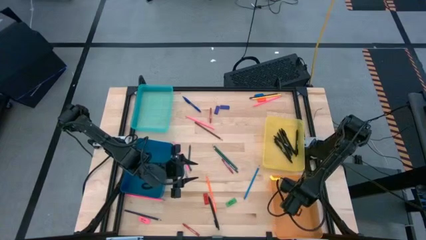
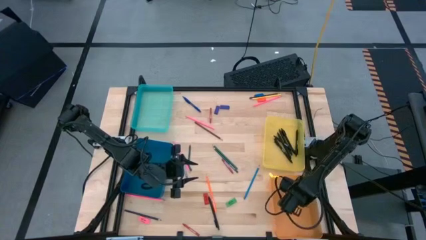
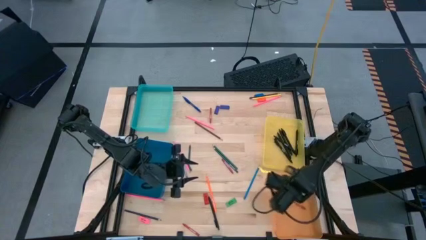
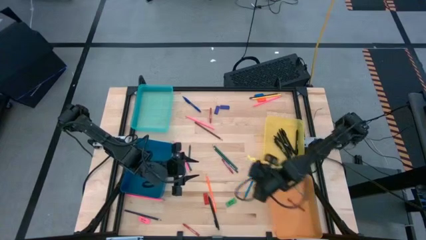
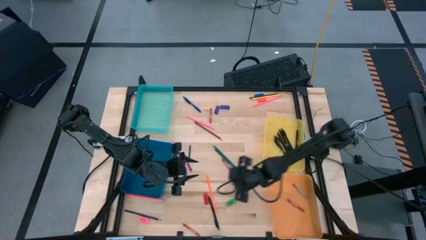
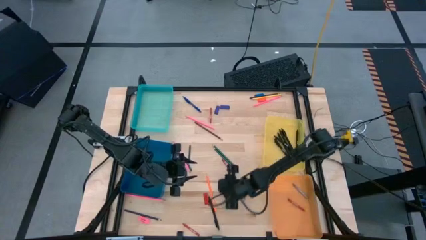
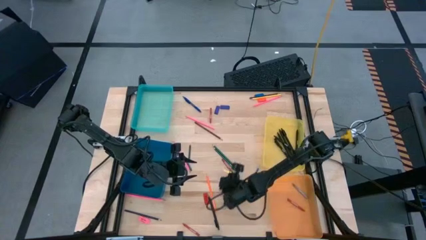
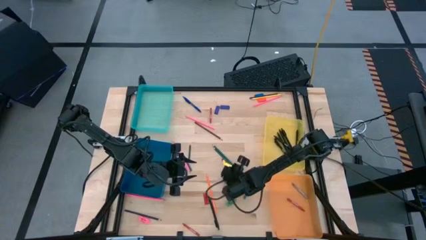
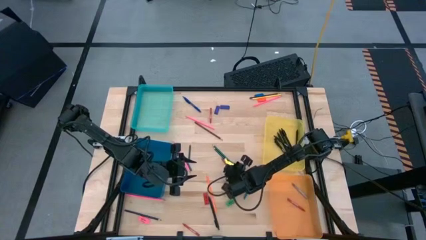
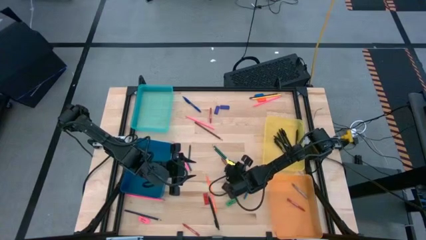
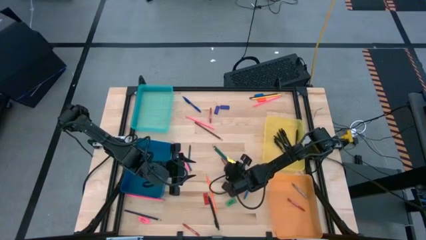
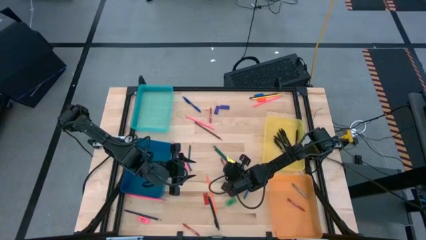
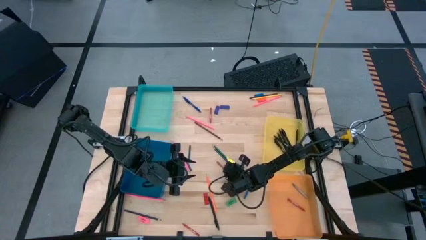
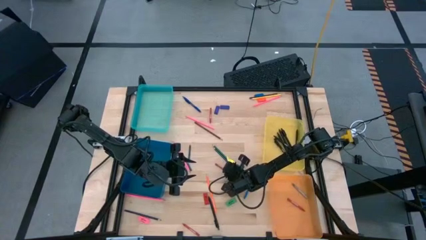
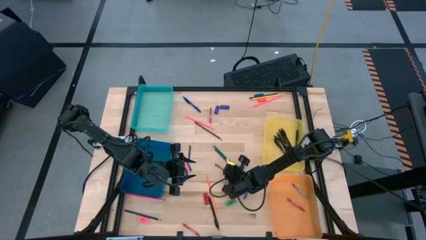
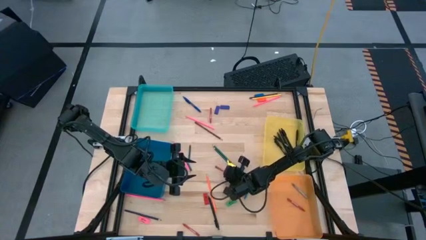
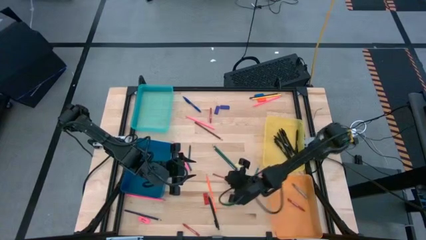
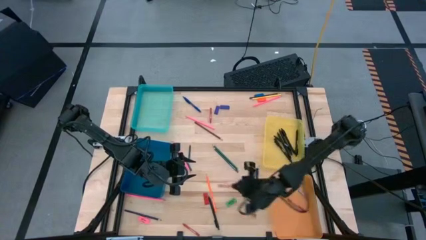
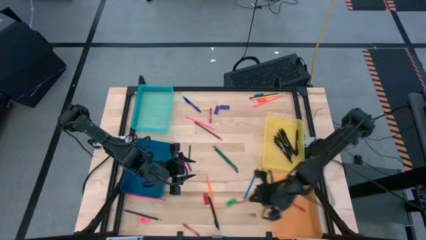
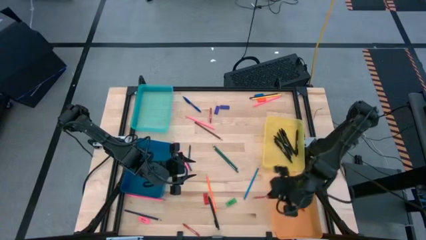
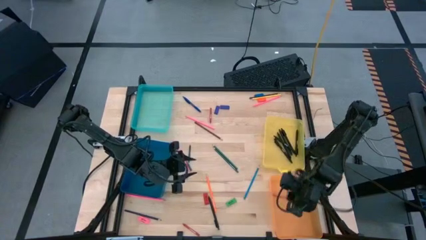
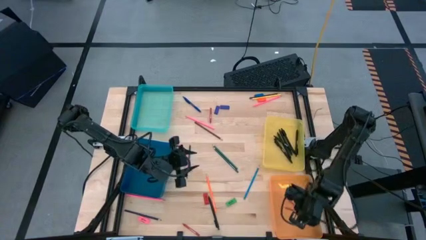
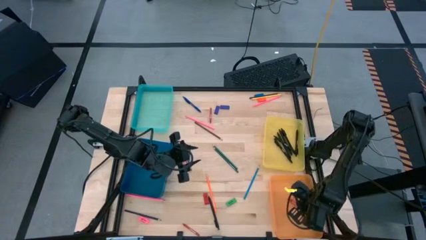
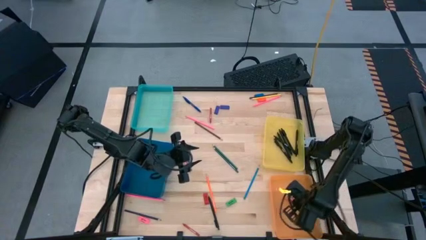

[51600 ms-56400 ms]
Task: Sort crayons/erasers/pens/pencils in bins
Put the red crayon into the orange bin

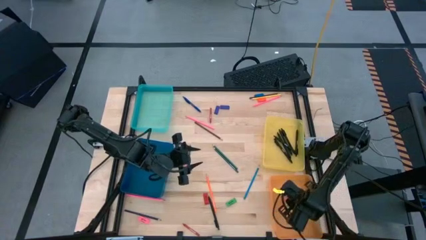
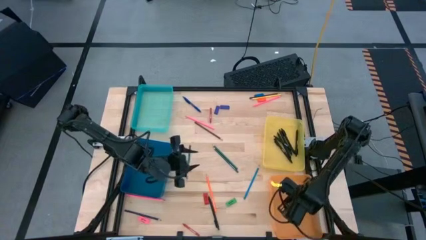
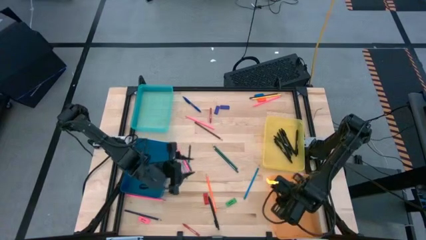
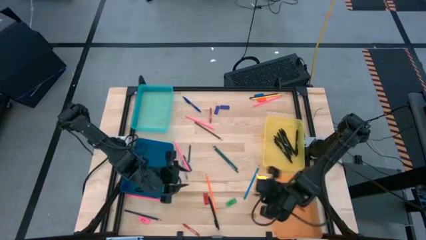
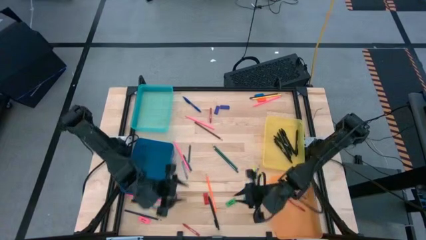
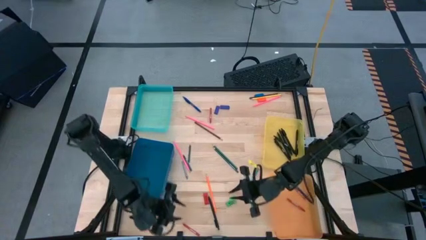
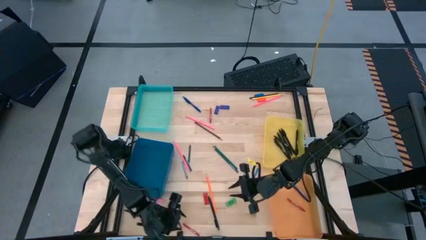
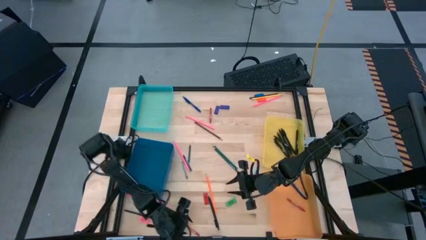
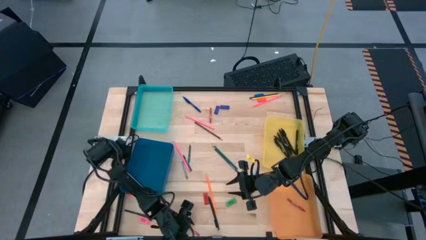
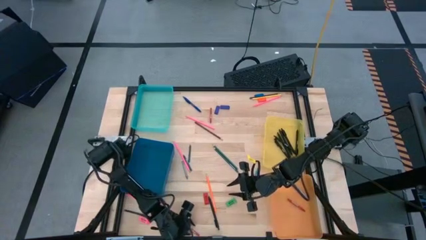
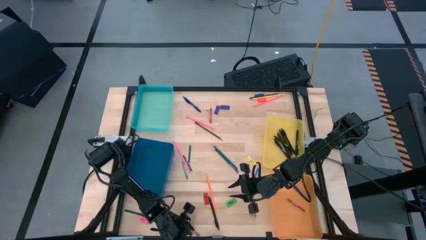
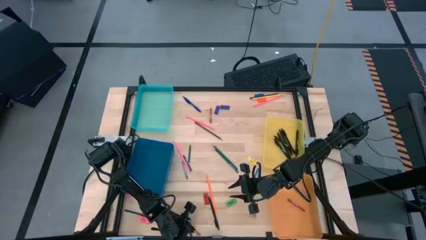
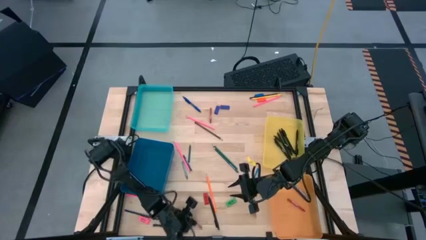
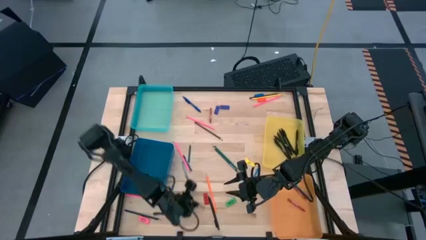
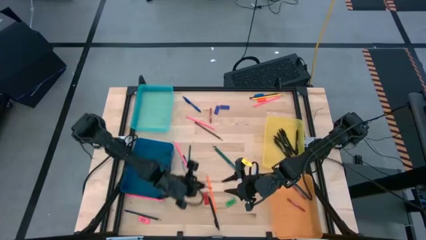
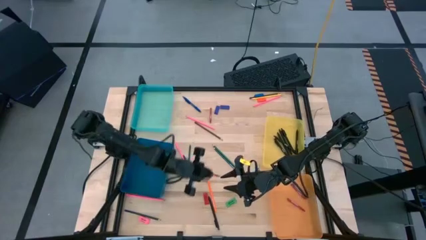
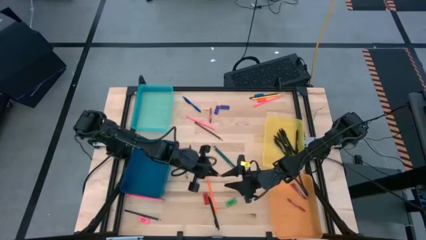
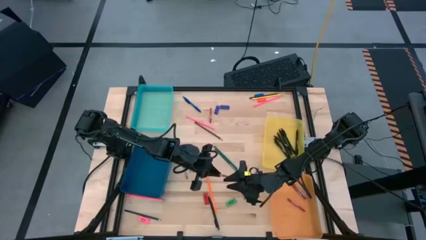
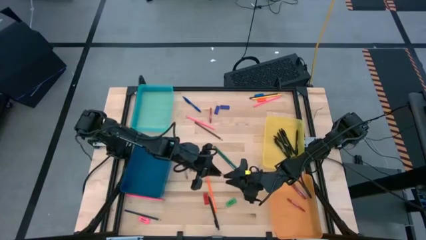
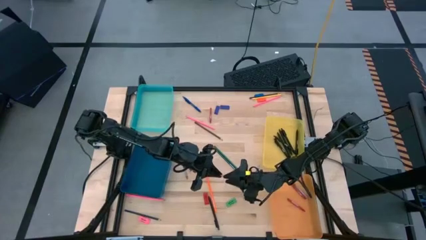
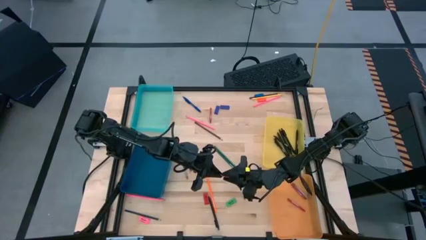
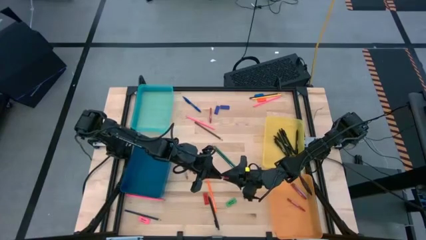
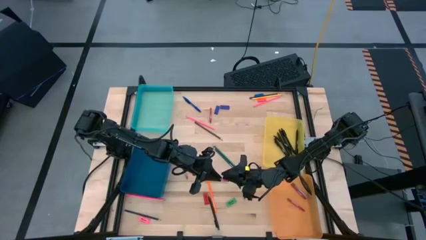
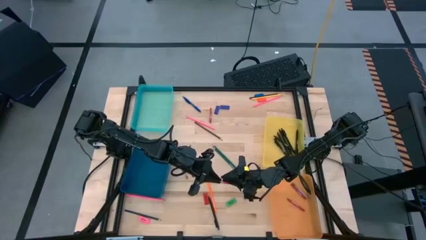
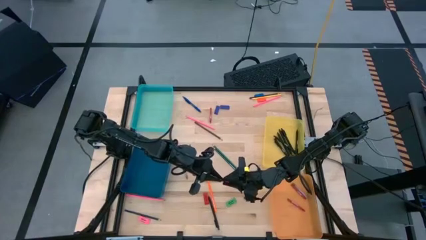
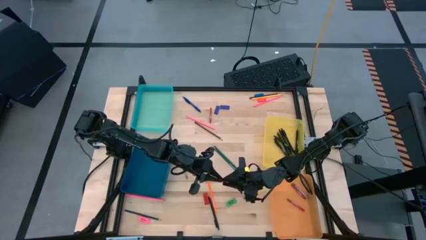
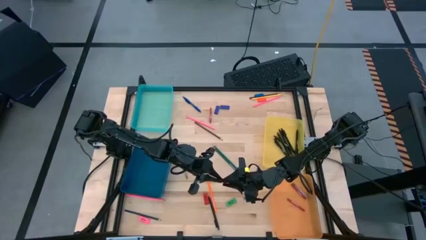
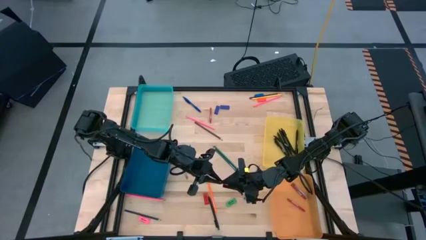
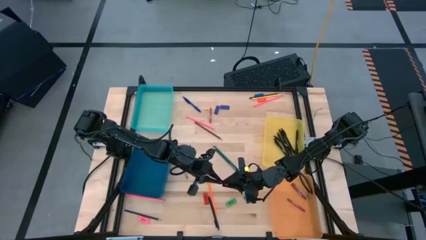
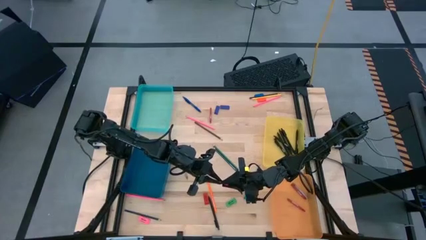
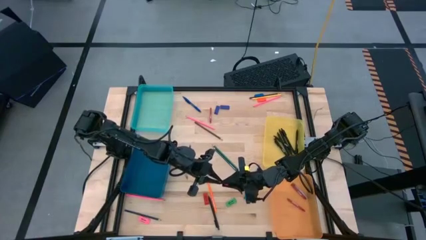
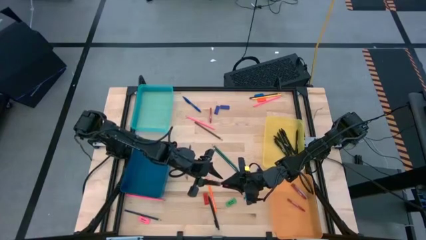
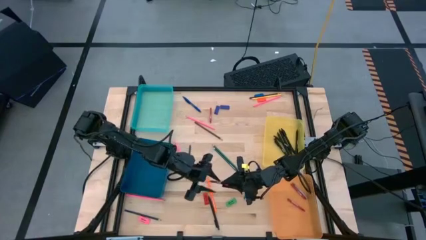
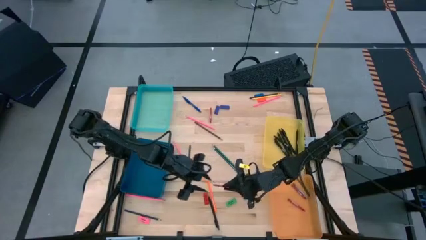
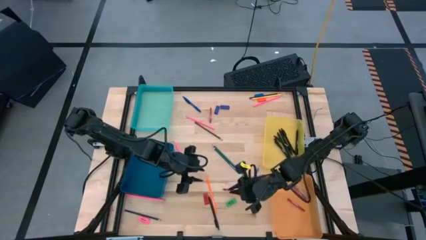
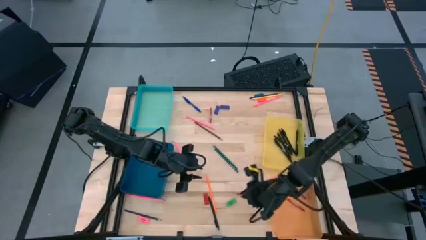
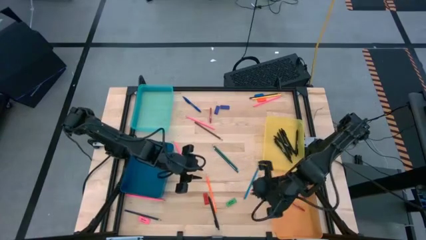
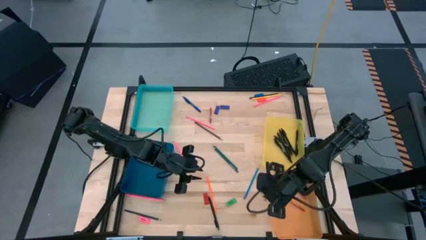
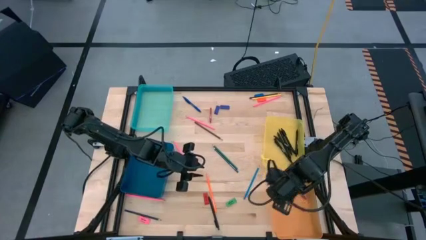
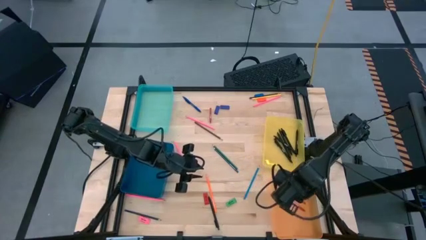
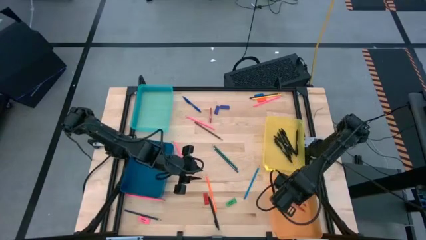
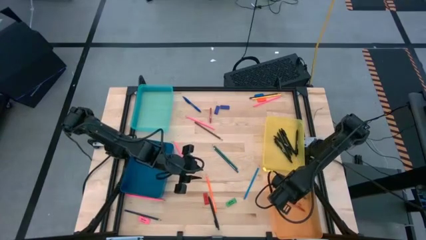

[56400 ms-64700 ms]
Put the red crayon into the orange bin

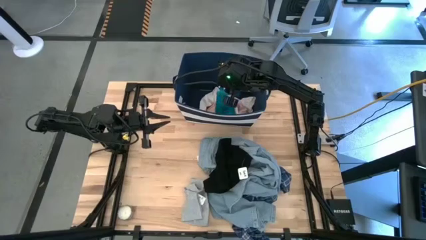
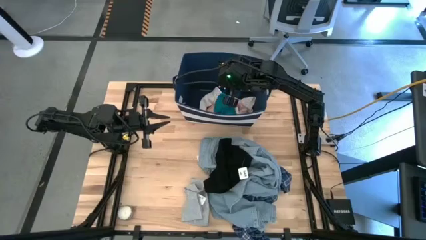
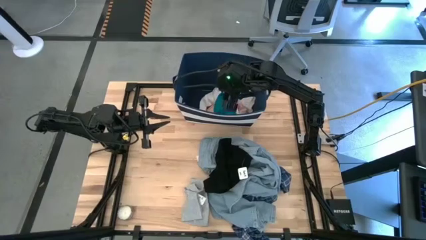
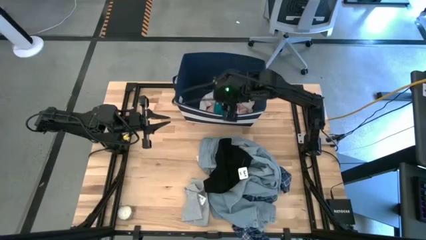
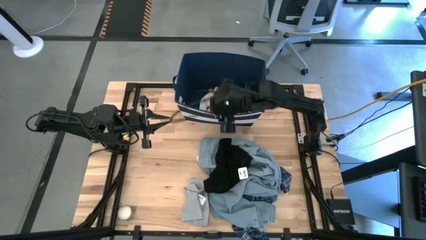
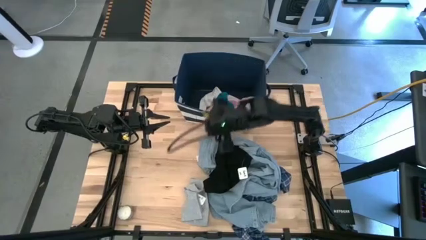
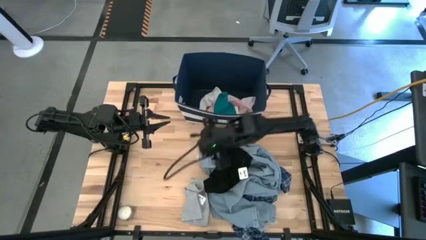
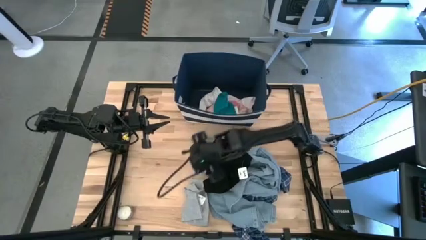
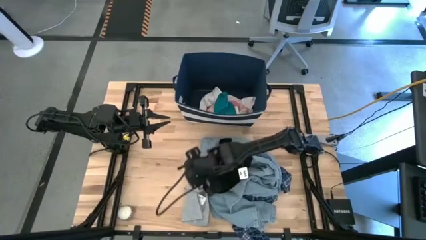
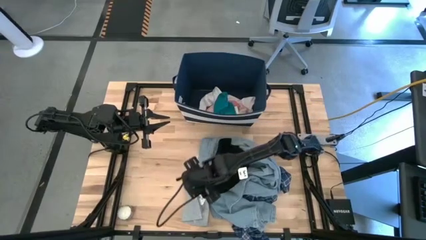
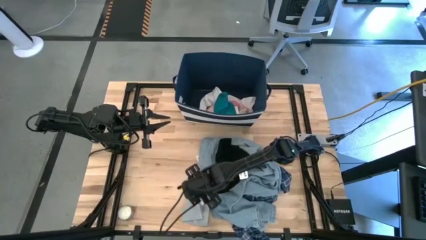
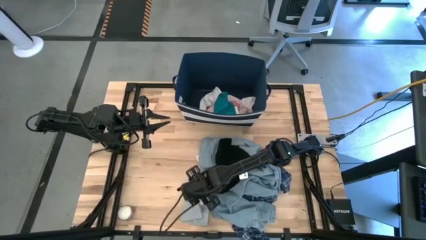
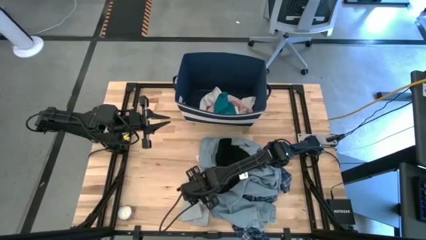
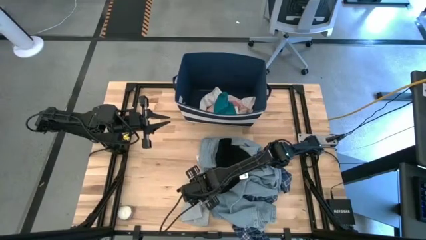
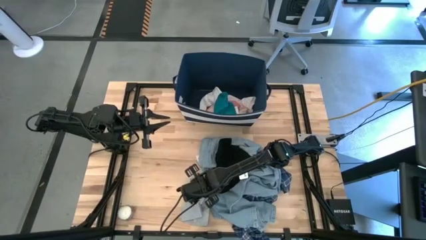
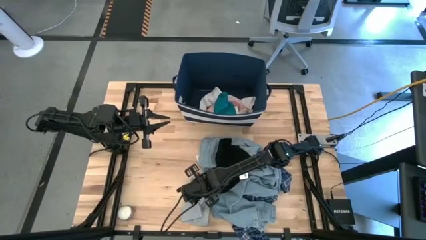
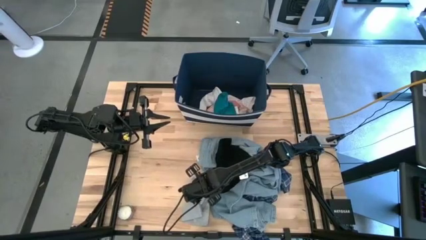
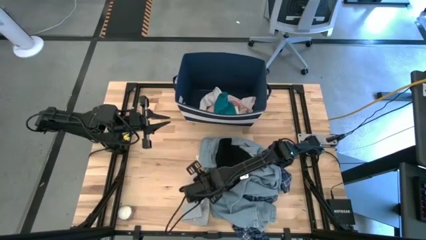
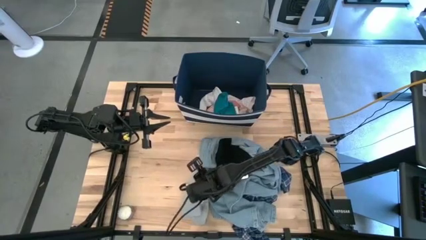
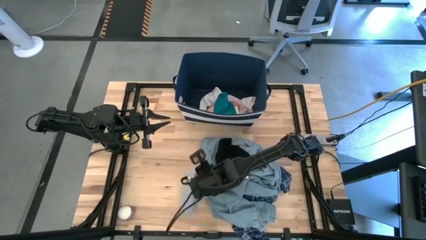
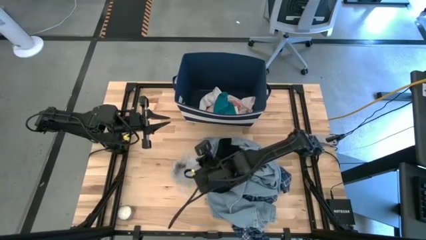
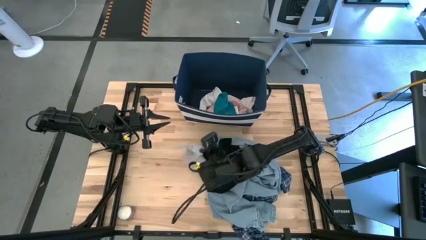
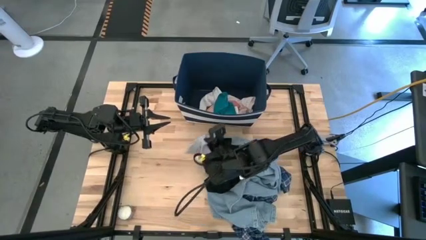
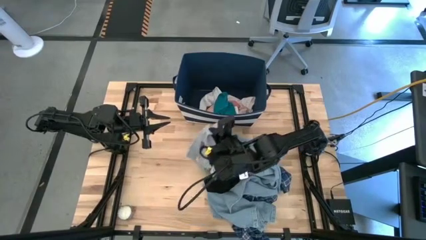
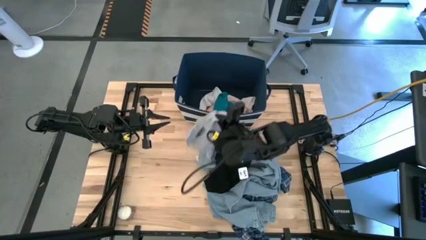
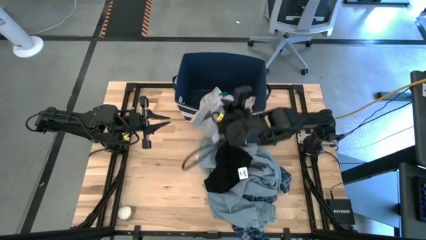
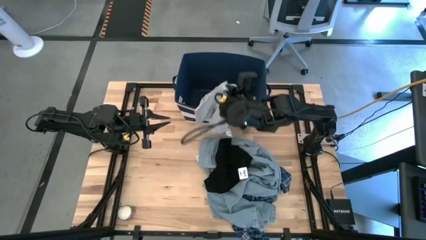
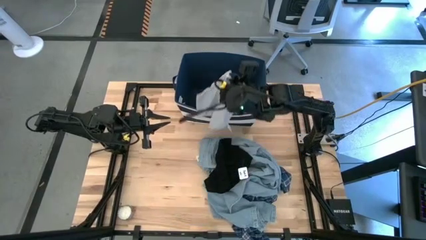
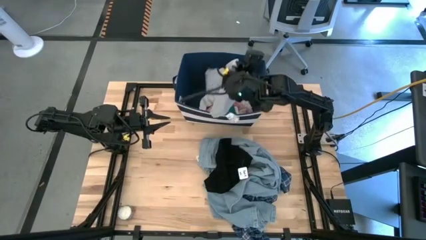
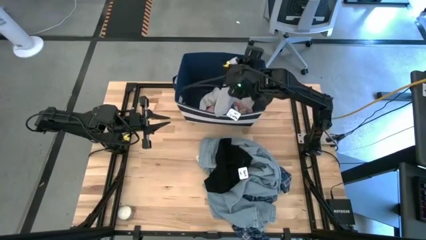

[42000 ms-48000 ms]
Task: Sort clothes
Put the gray shorts into the blue bin
